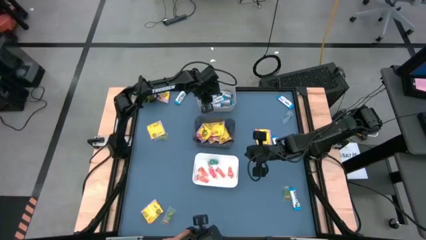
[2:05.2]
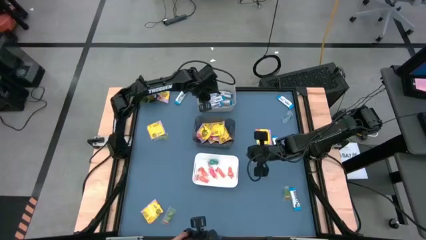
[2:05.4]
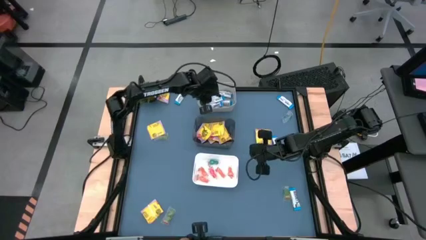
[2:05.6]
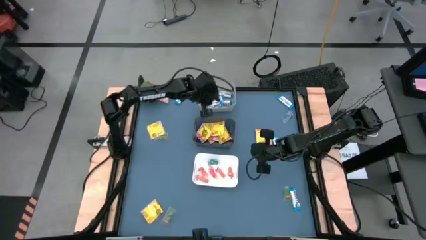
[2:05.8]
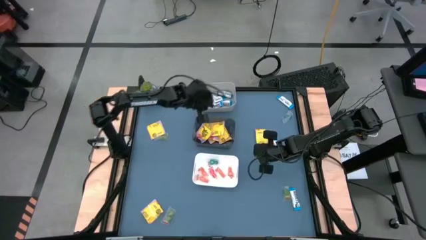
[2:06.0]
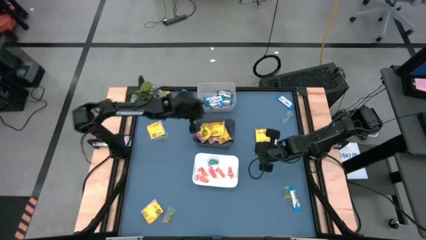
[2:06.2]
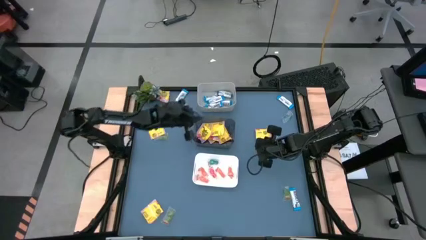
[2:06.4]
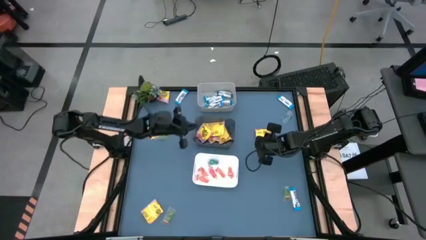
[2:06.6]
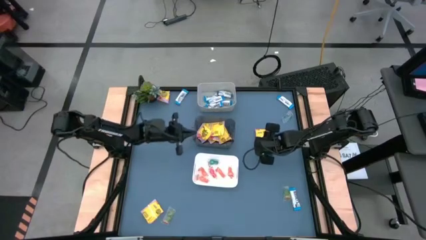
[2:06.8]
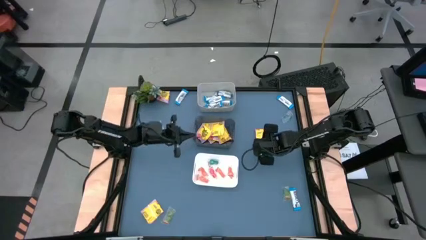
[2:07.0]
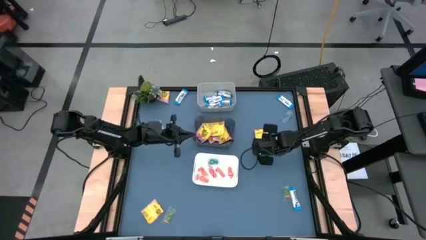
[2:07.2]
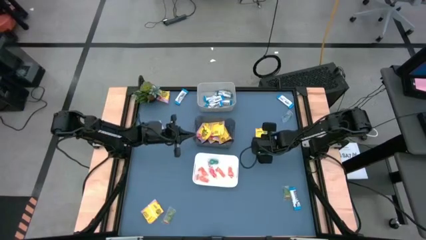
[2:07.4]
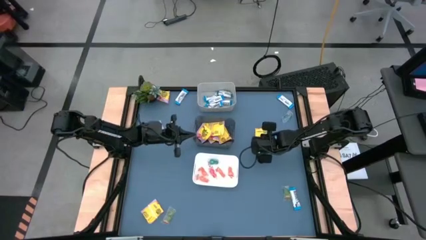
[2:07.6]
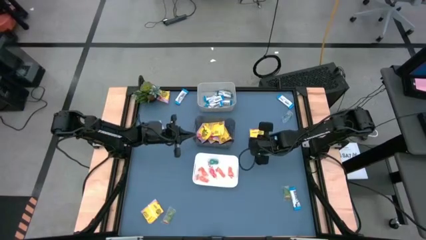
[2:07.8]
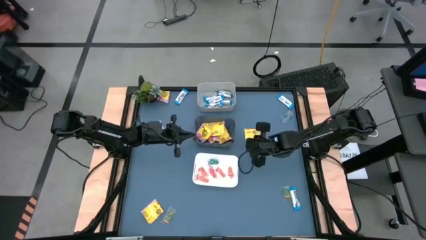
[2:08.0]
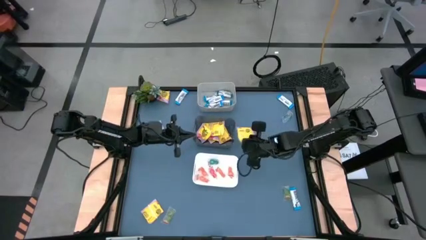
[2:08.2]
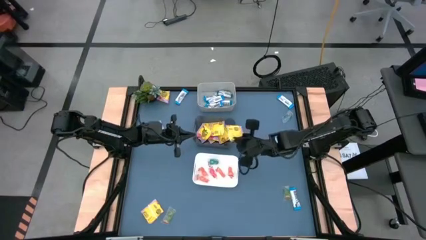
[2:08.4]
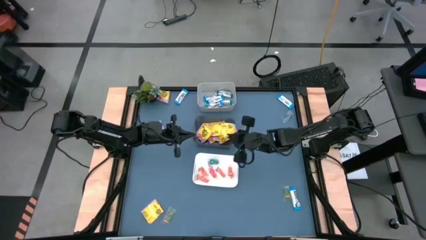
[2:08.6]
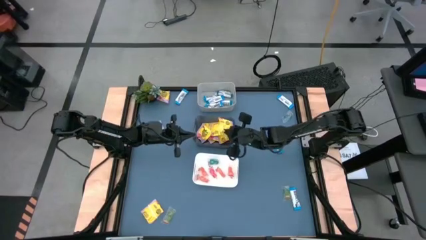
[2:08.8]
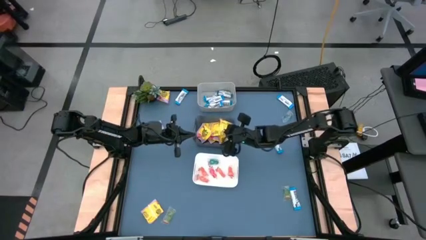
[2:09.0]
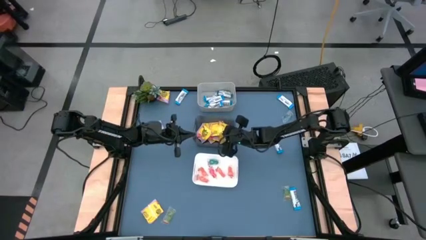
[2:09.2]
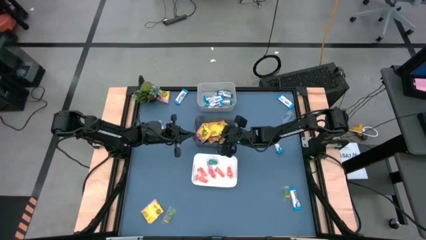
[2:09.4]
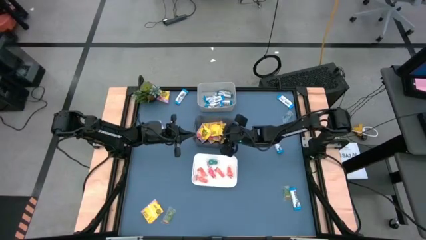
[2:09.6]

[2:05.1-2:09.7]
Task: Sort candy
Put the yellow candy into the black bin

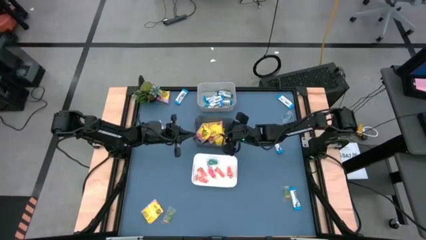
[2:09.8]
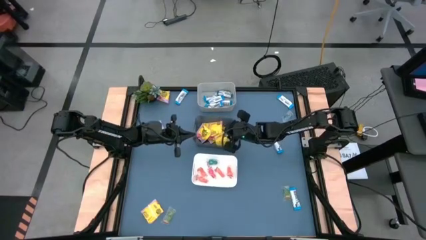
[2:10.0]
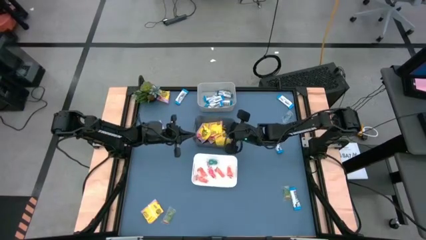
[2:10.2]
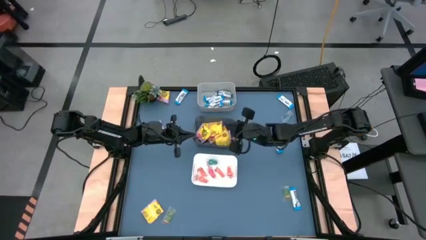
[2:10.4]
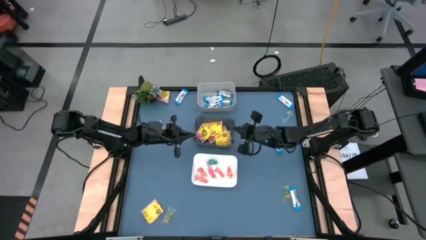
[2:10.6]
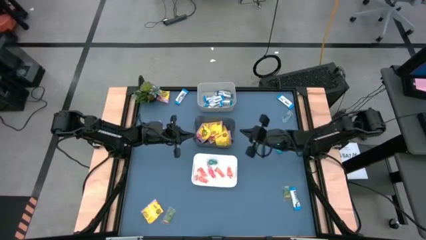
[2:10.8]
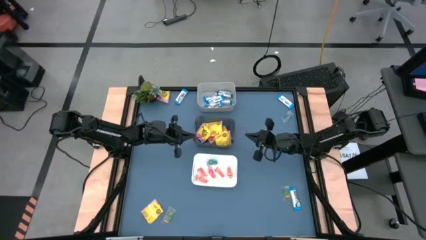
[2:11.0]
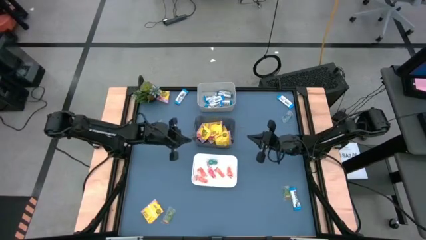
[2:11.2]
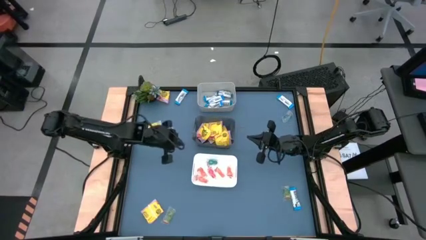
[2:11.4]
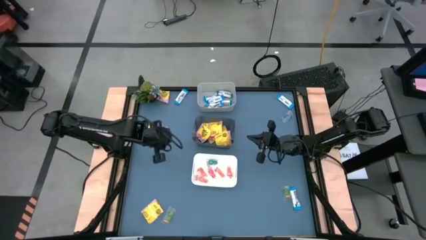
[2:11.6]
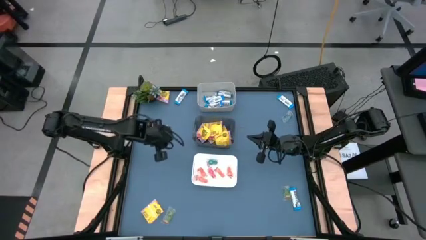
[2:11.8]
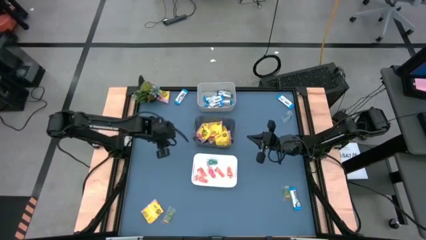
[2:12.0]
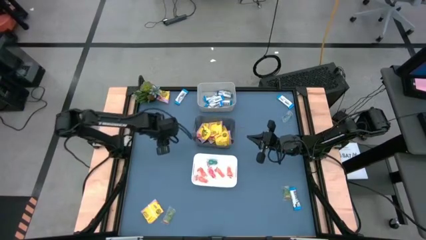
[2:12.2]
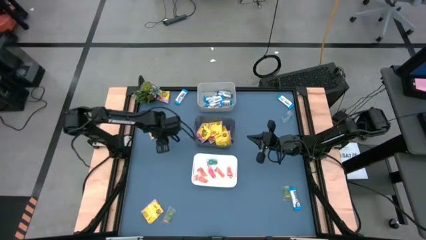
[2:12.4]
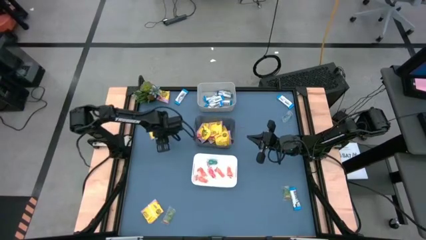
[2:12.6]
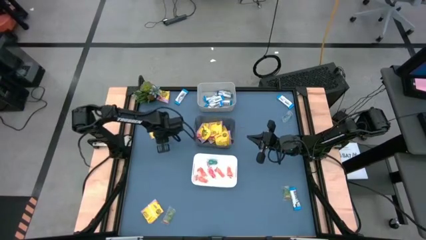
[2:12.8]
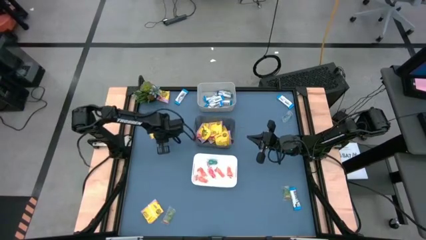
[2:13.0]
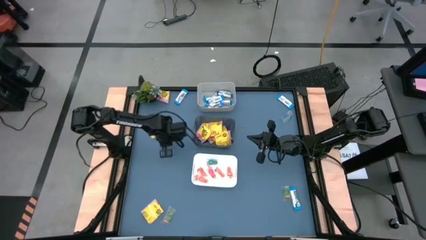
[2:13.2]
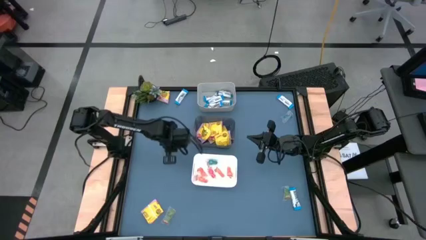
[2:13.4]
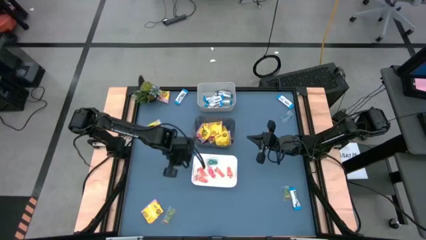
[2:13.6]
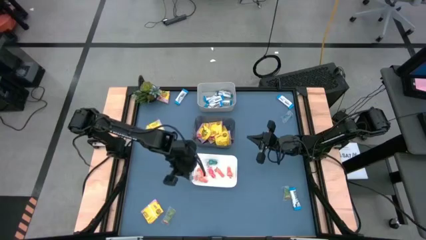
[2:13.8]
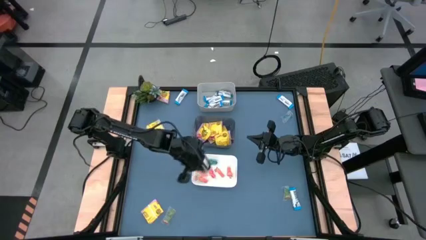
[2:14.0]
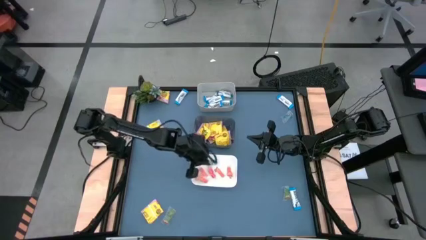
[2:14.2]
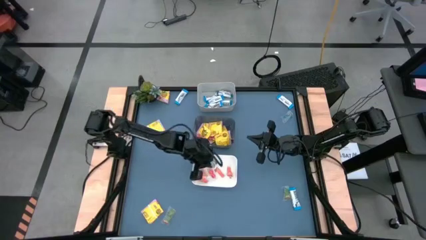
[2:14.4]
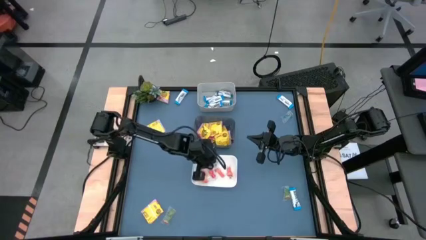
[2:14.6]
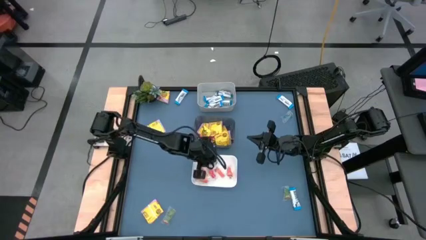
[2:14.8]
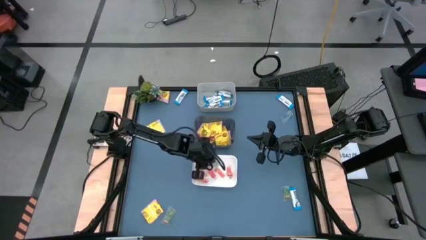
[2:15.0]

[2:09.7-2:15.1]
Put the green gummy candy into the white bin

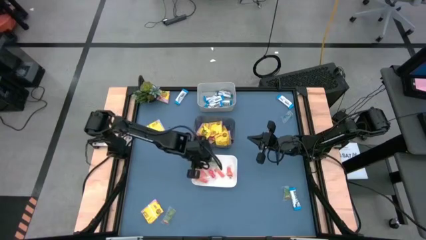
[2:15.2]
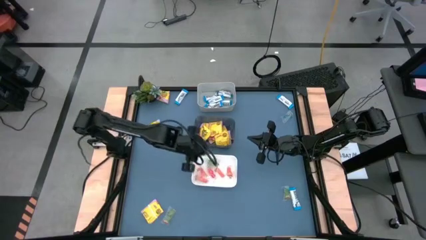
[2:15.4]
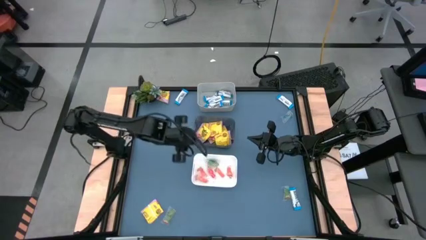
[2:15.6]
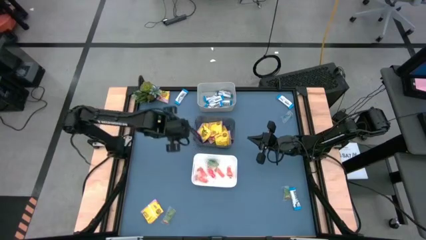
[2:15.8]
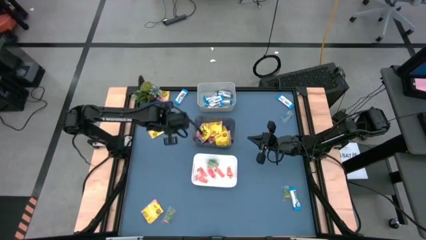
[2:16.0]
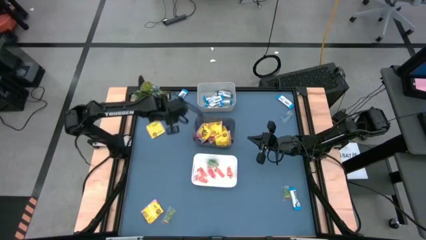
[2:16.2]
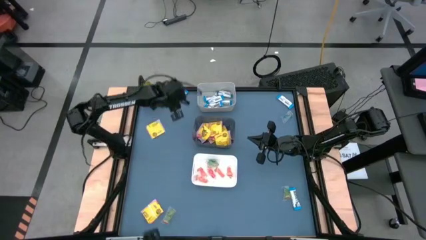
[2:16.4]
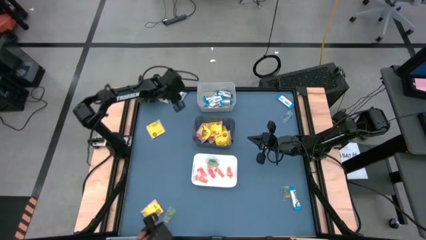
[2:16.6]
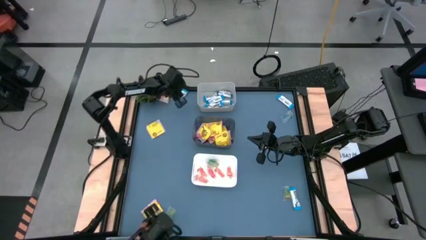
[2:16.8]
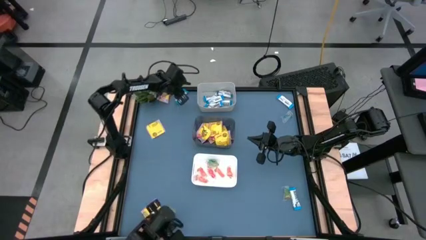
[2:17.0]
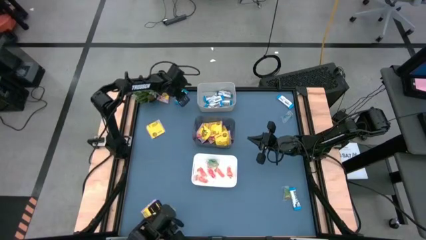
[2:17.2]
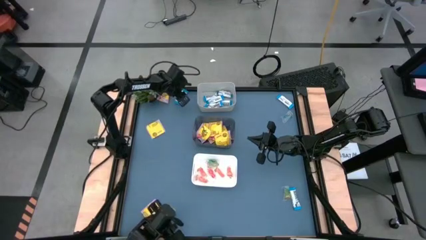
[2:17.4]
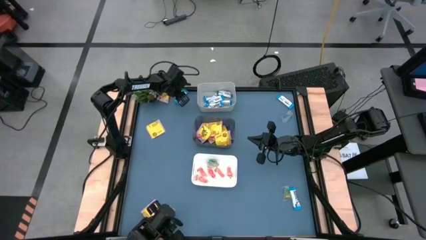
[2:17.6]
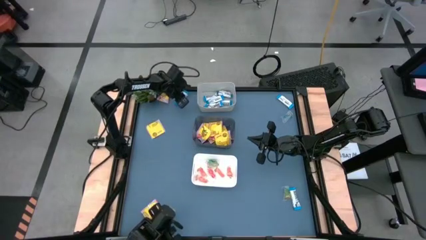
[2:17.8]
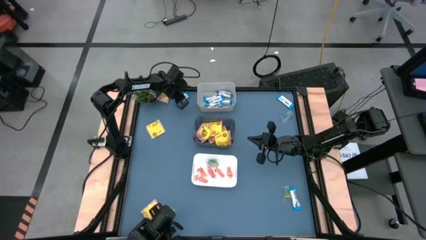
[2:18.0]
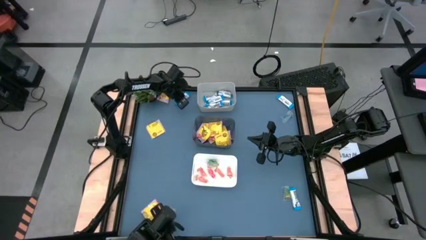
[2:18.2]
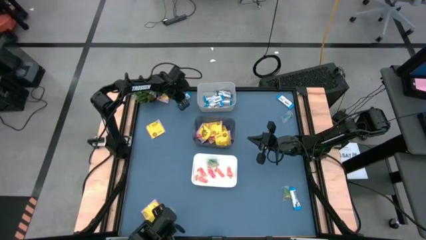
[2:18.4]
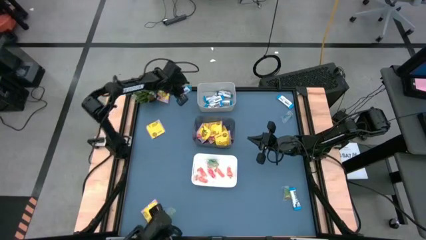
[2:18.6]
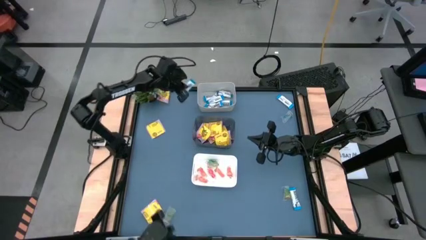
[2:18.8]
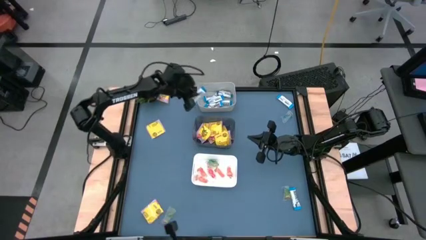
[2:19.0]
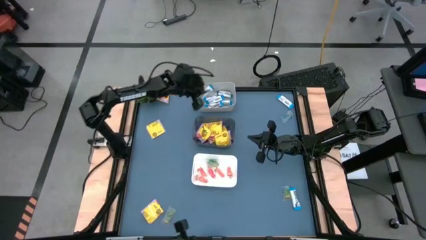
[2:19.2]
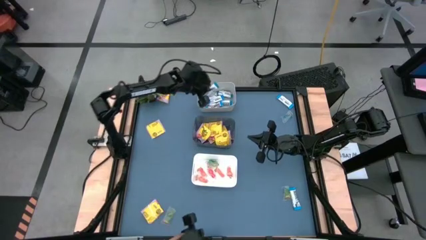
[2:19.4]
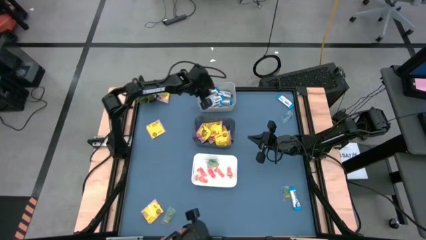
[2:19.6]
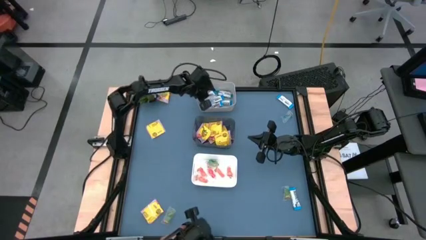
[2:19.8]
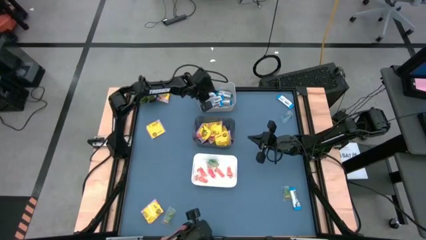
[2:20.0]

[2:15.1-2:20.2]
Put the white chocolate bar into the gray bin
